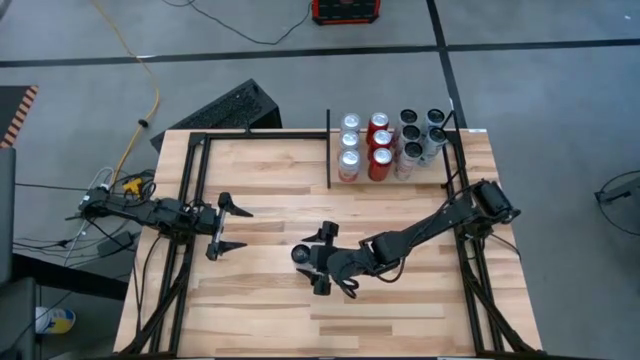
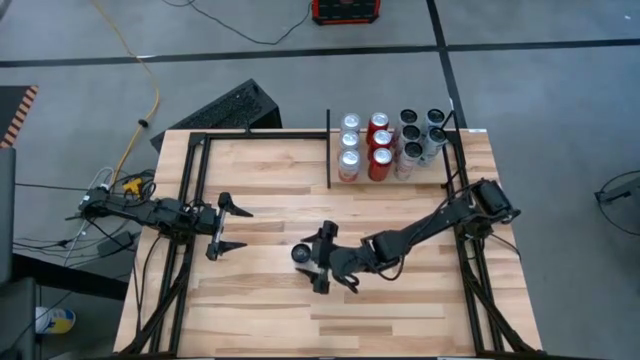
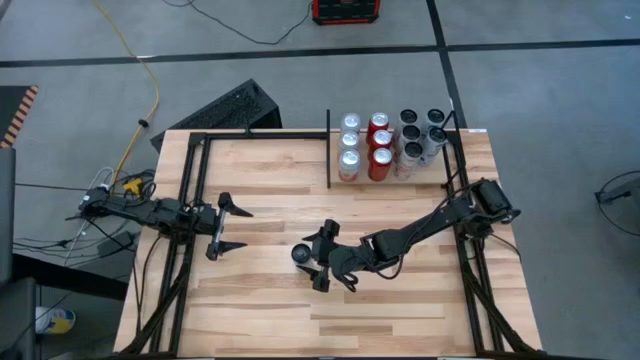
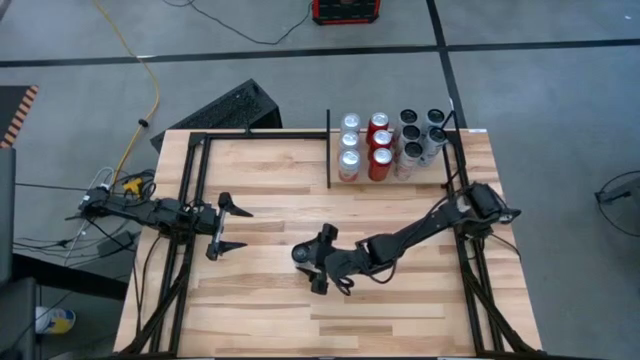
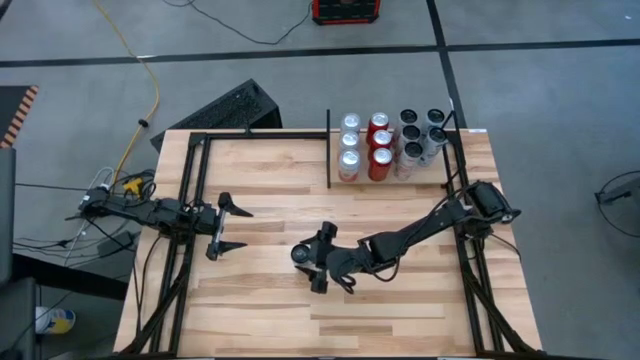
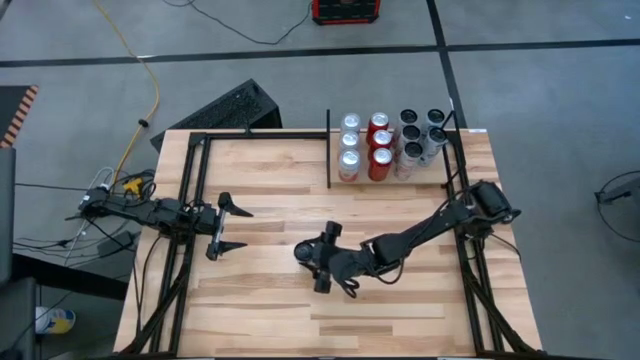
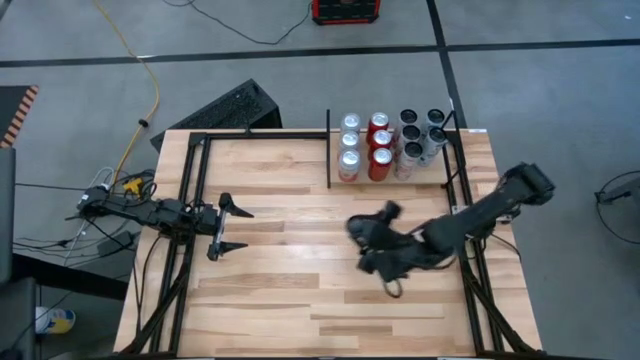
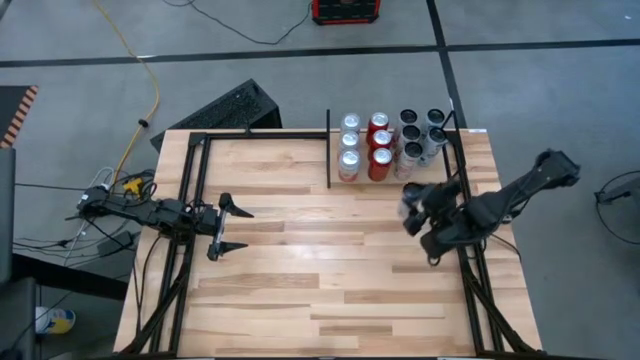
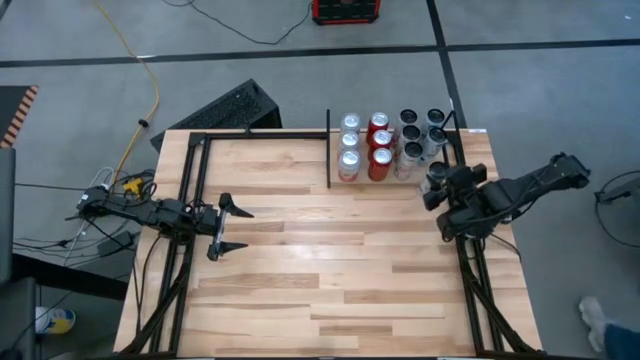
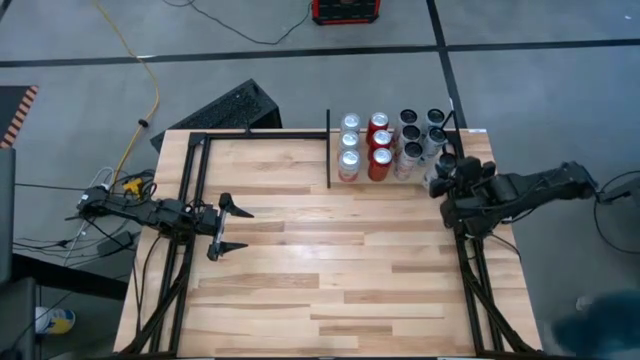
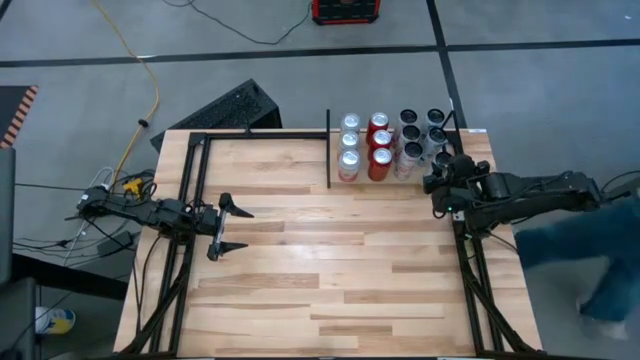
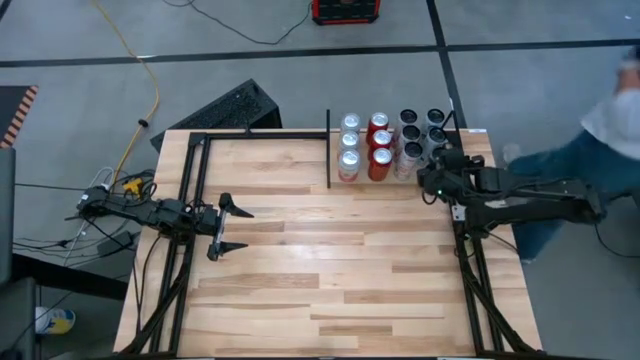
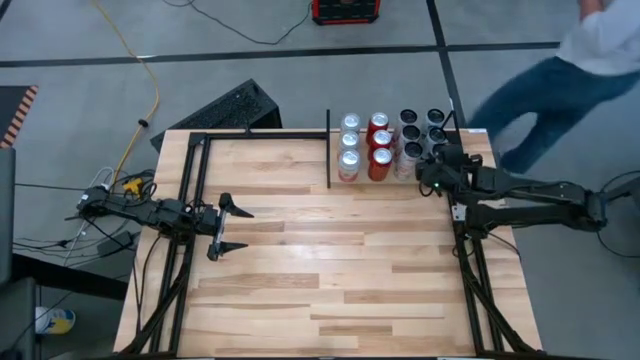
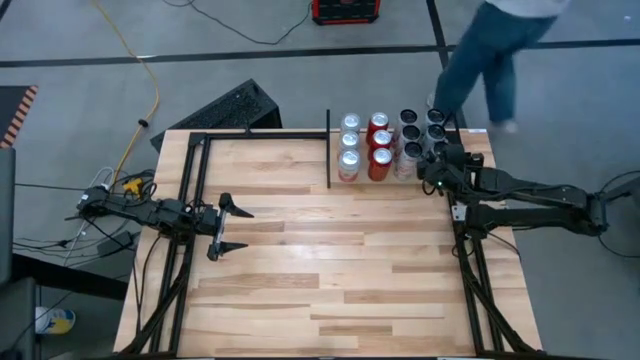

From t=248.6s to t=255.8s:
Task: Place canned beverage on shelf
Put the black blue soda can on the shelf

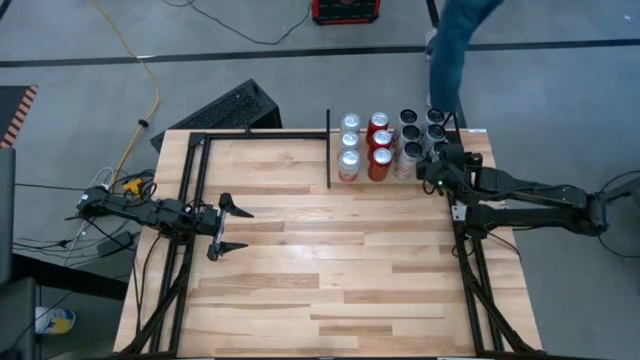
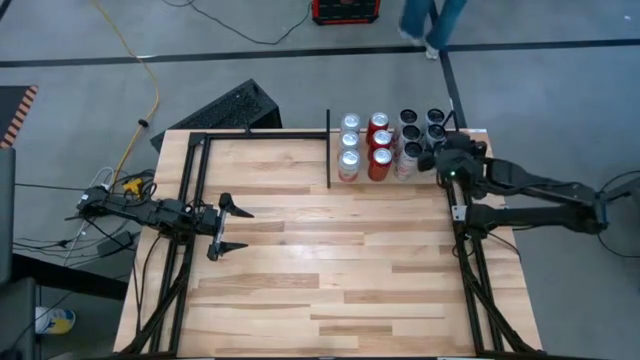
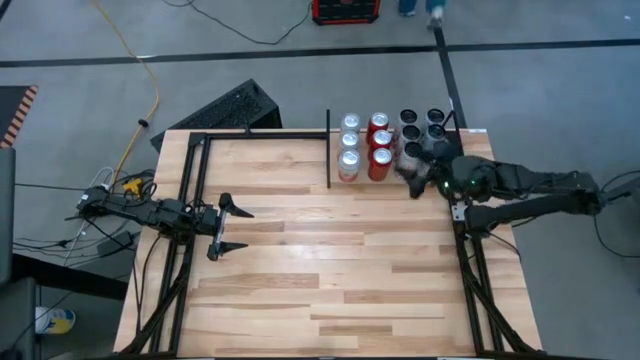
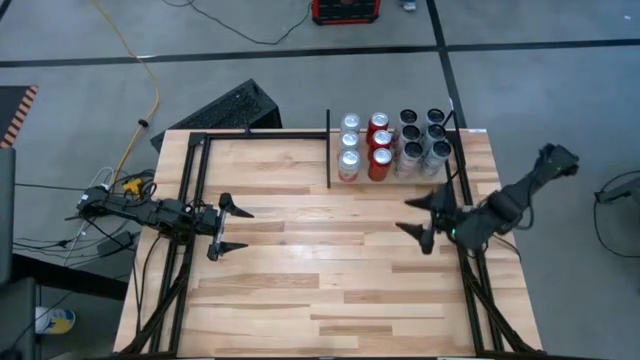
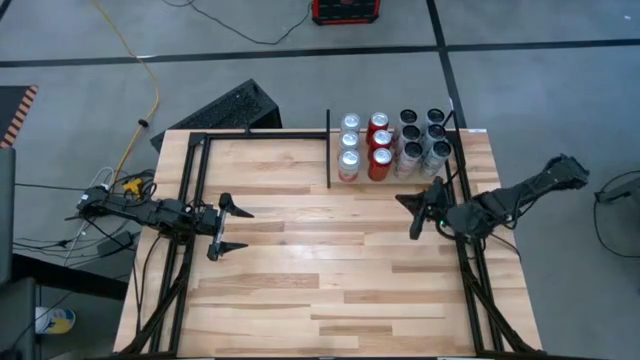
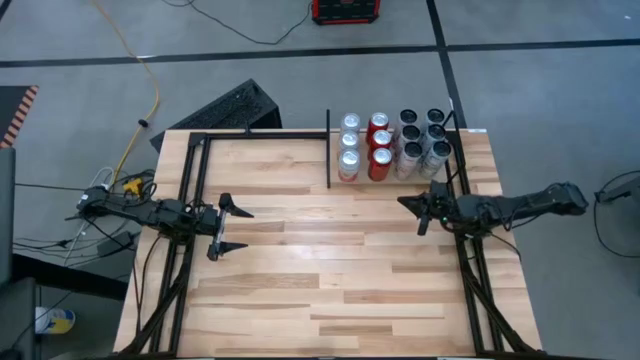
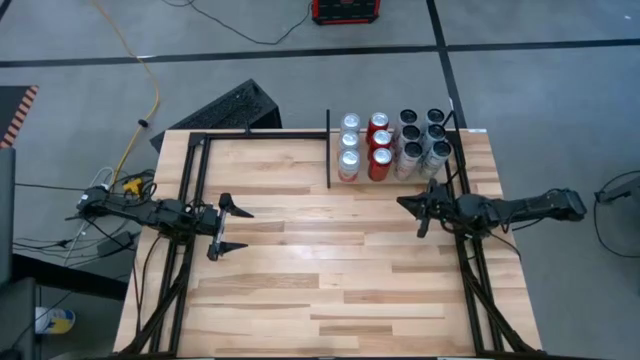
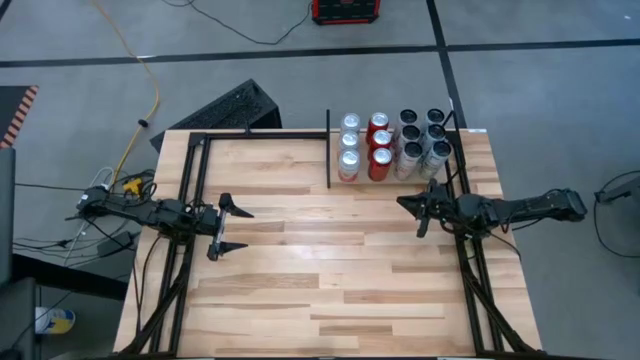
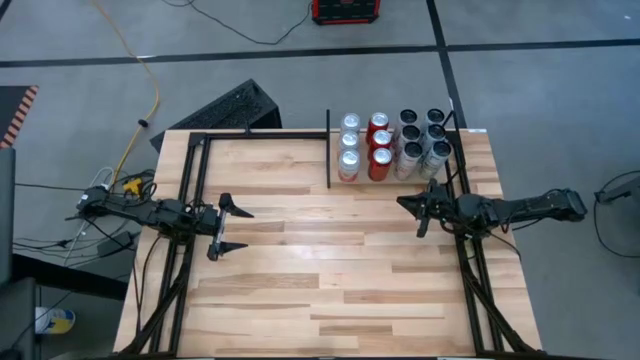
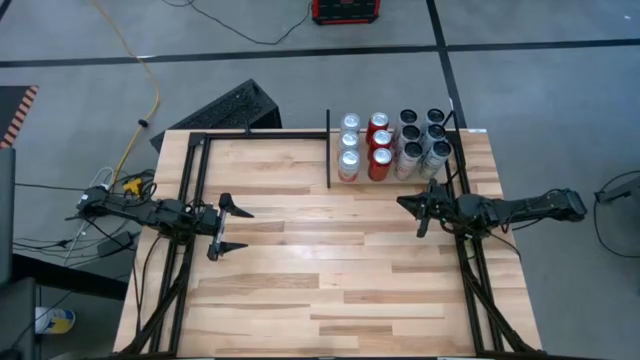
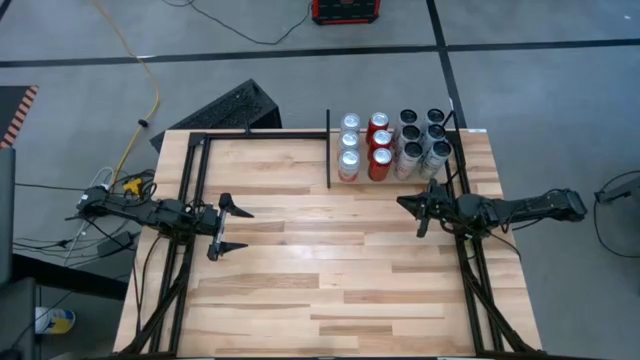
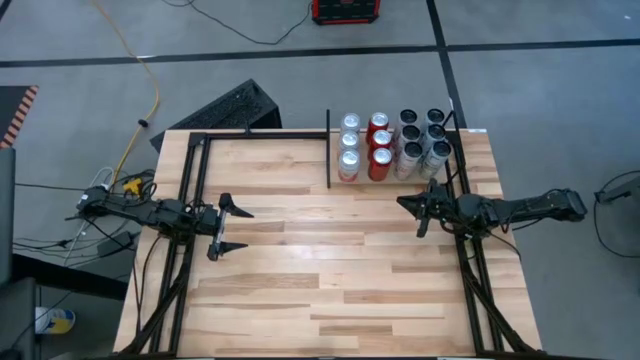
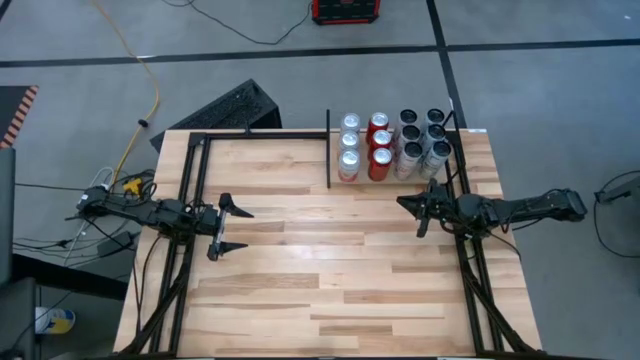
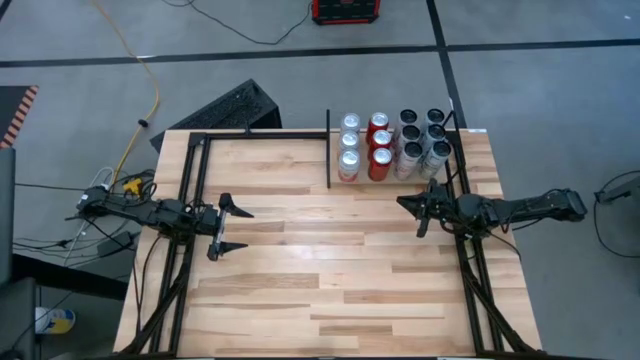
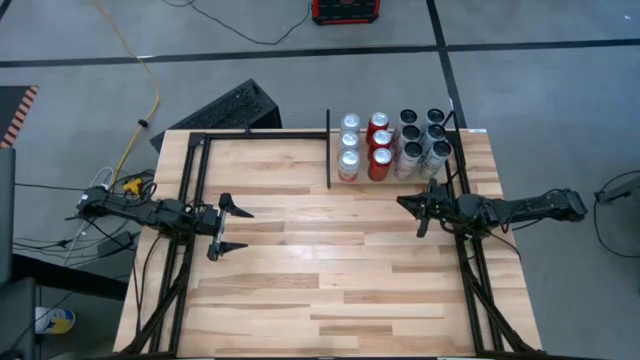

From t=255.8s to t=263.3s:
Return to Home Position

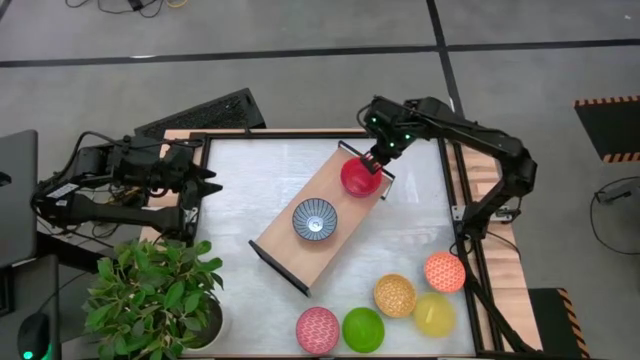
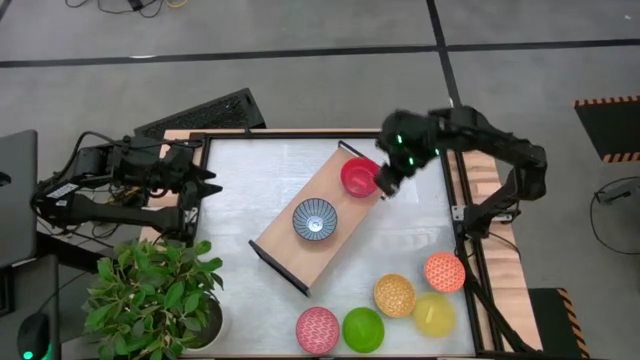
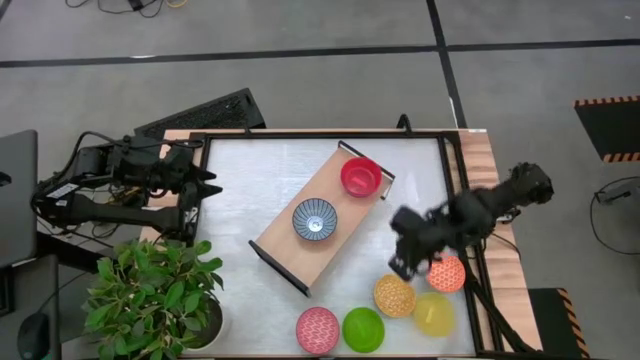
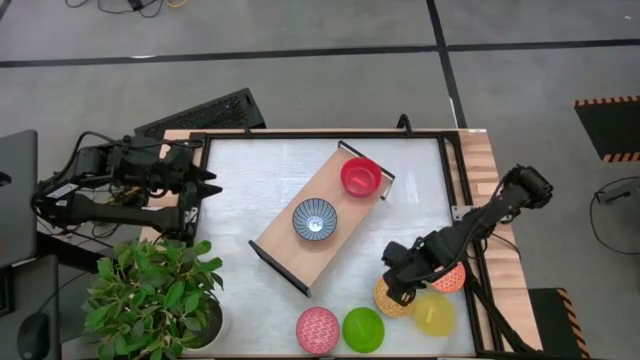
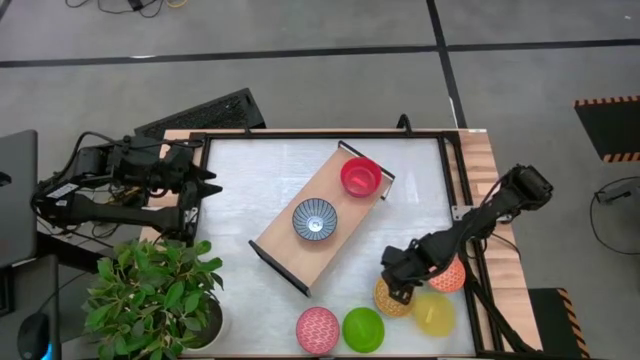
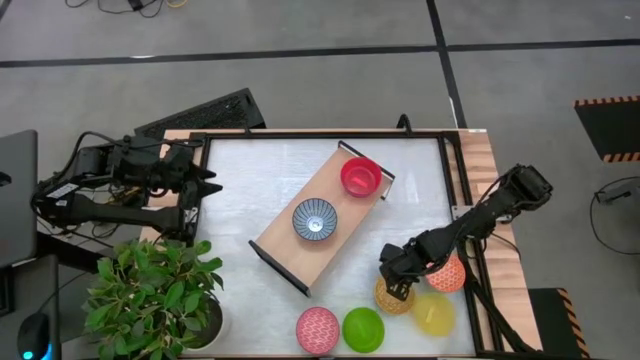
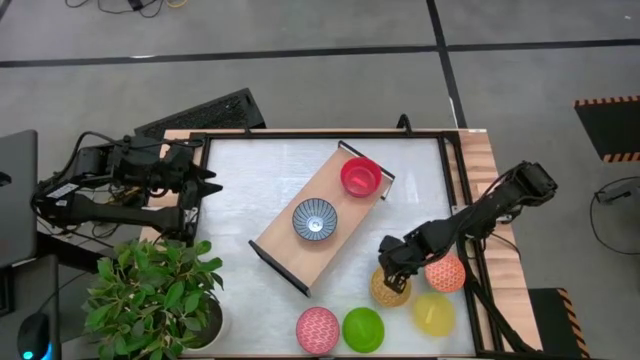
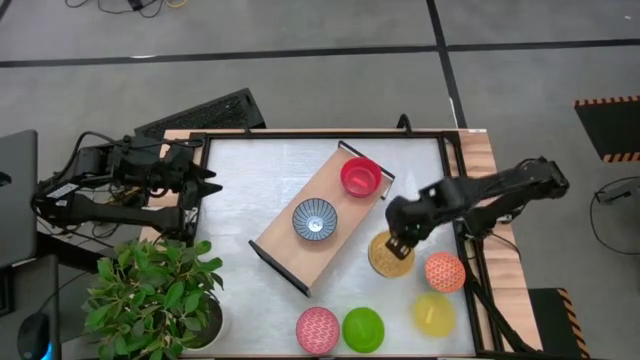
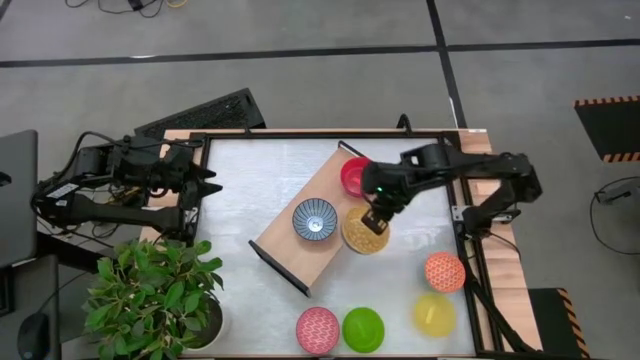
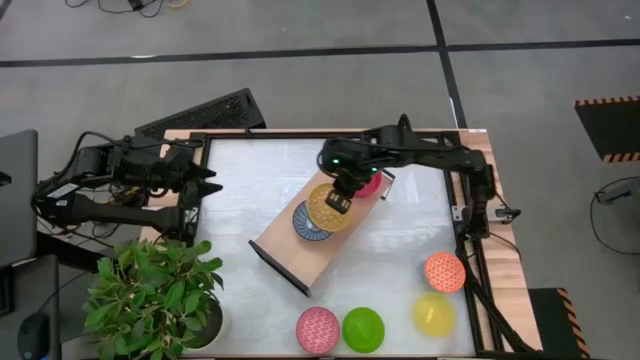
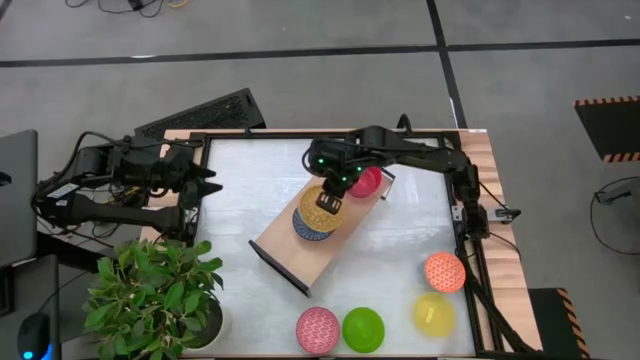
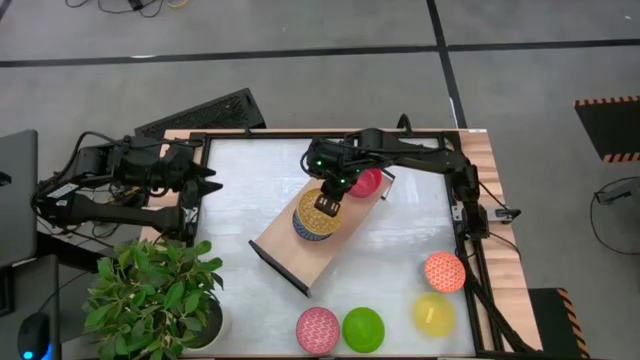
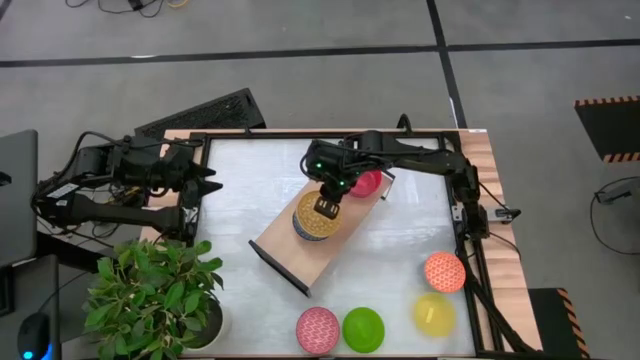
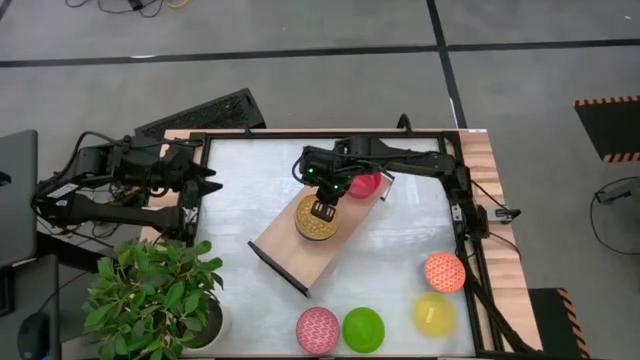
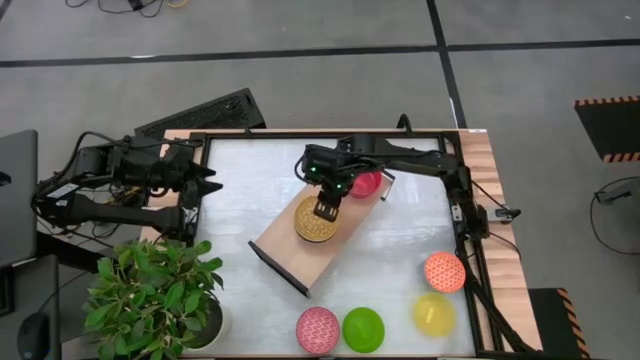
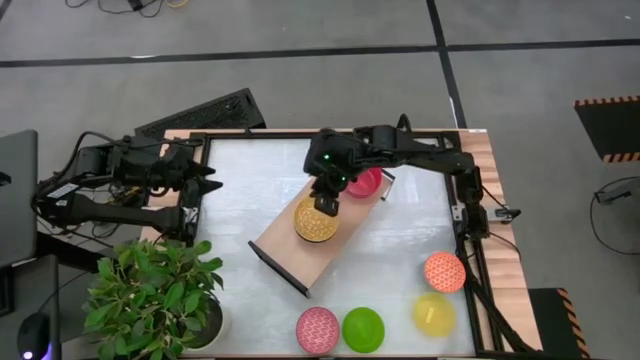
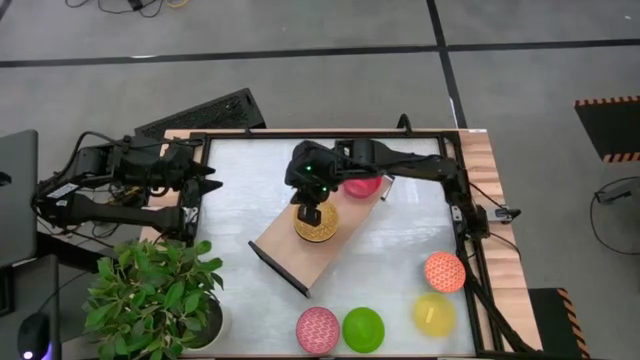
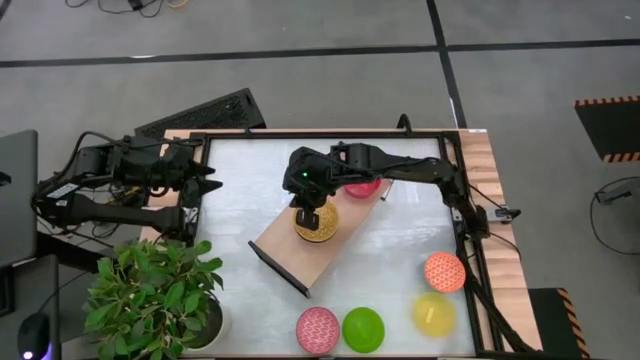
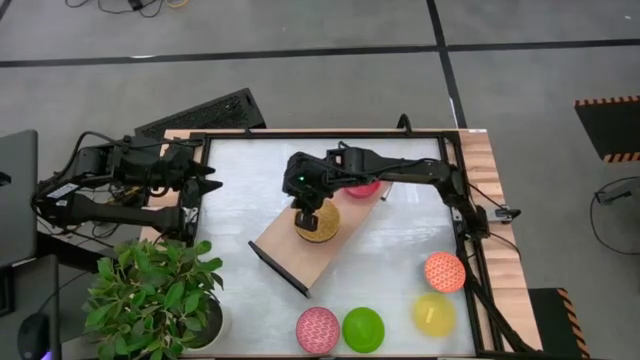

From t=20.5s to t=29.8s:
Task: Place and stack bowls onto a shelf
Stack the yellow patterned bowl on top of the blue patterned bowl on the shelf
